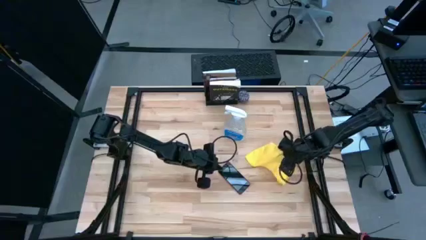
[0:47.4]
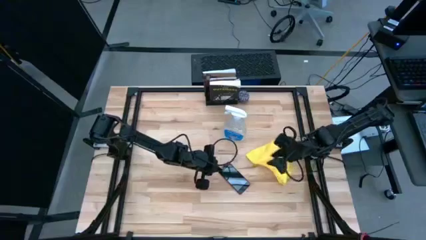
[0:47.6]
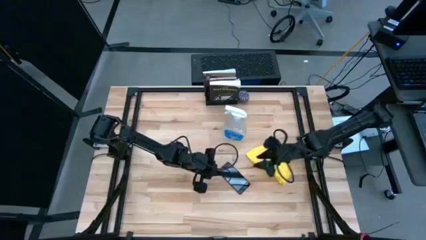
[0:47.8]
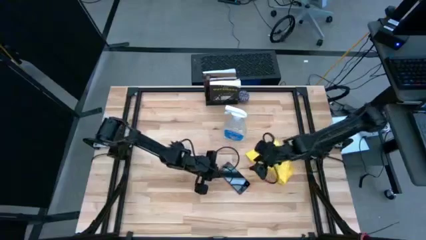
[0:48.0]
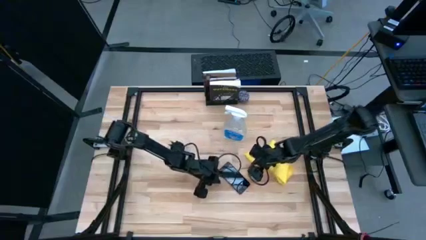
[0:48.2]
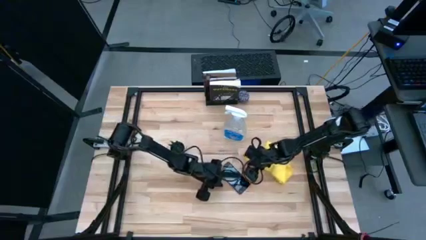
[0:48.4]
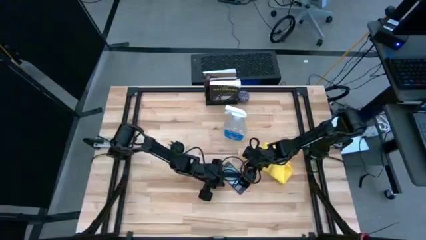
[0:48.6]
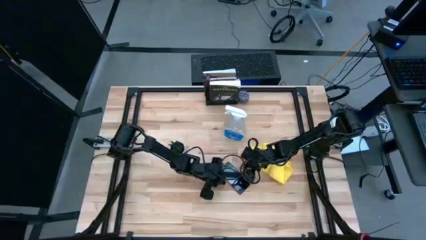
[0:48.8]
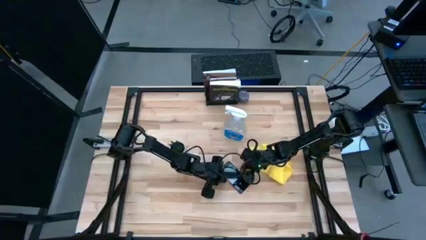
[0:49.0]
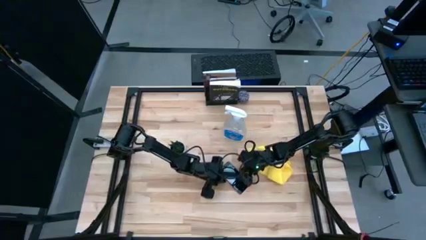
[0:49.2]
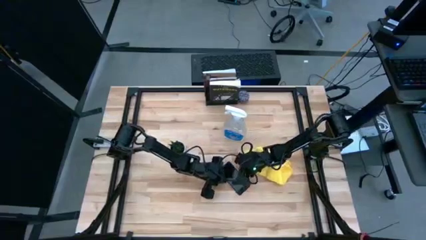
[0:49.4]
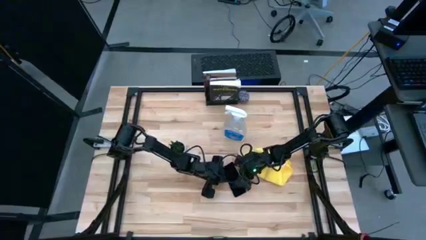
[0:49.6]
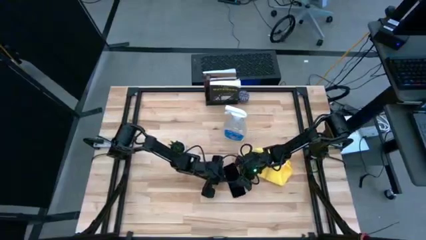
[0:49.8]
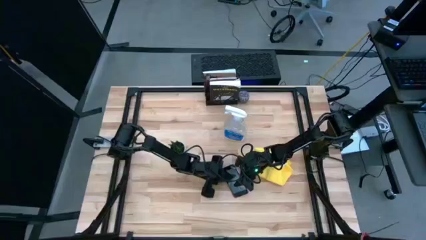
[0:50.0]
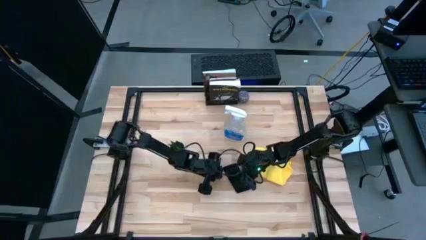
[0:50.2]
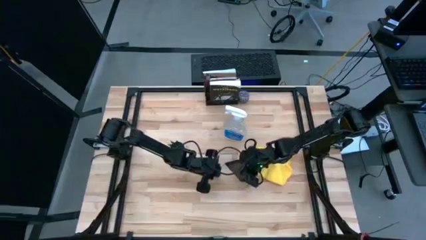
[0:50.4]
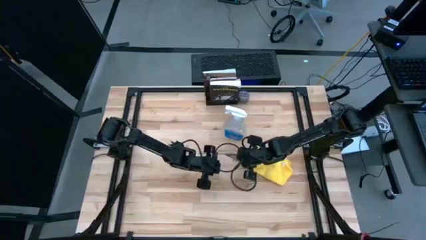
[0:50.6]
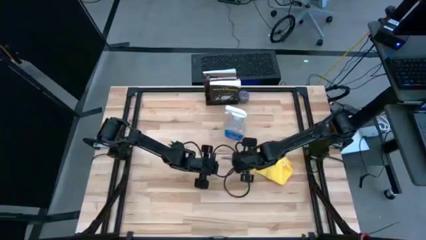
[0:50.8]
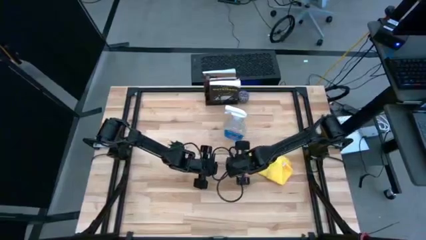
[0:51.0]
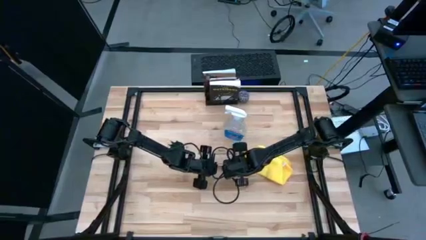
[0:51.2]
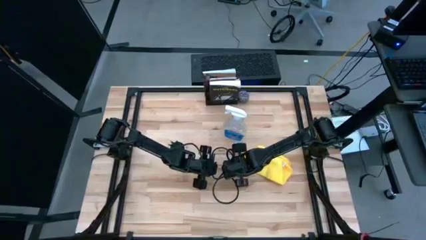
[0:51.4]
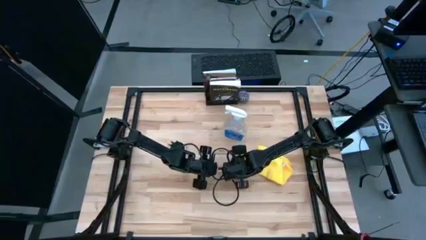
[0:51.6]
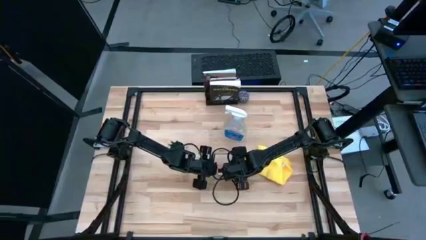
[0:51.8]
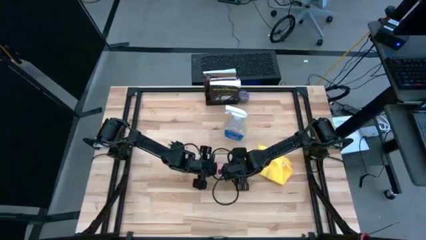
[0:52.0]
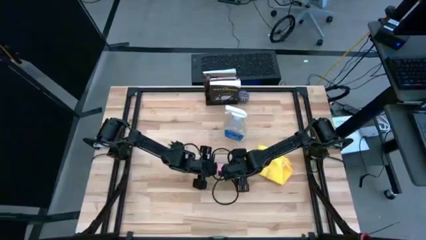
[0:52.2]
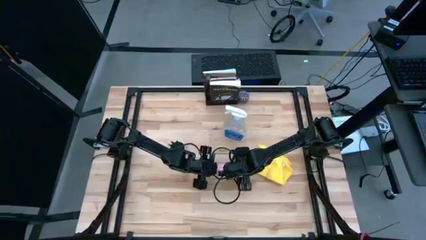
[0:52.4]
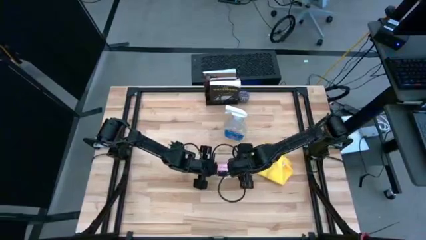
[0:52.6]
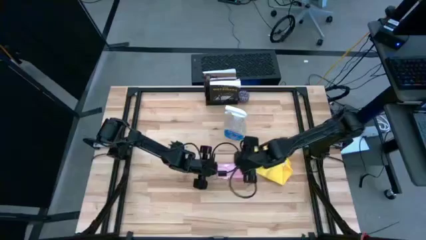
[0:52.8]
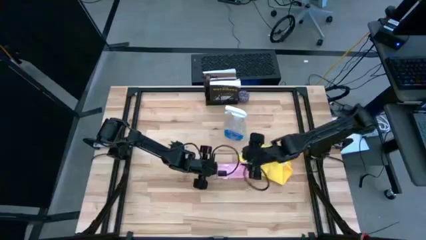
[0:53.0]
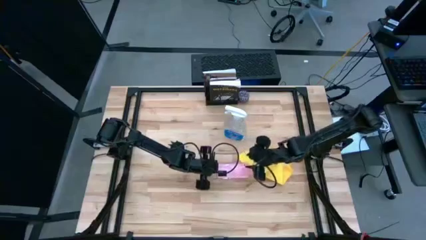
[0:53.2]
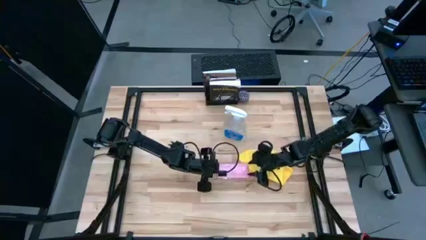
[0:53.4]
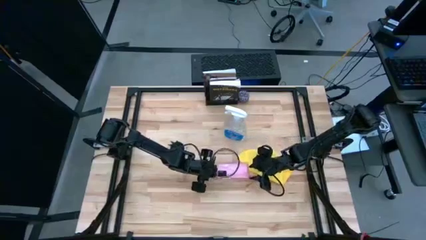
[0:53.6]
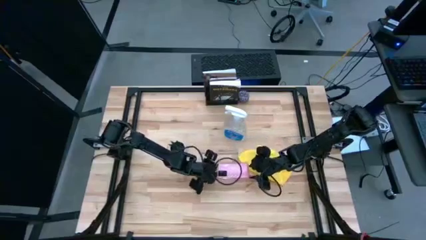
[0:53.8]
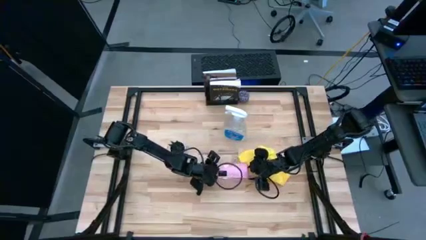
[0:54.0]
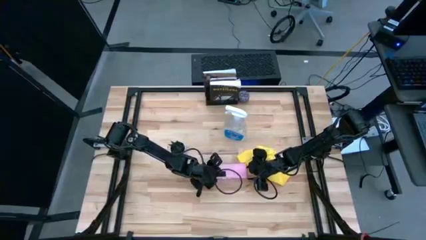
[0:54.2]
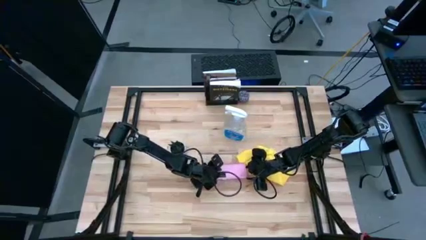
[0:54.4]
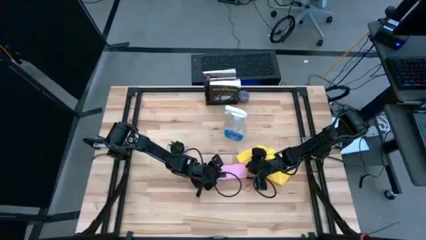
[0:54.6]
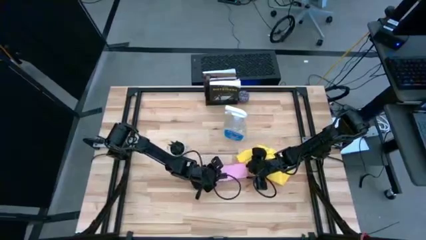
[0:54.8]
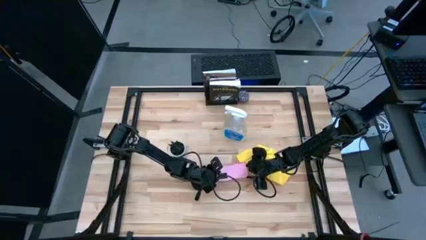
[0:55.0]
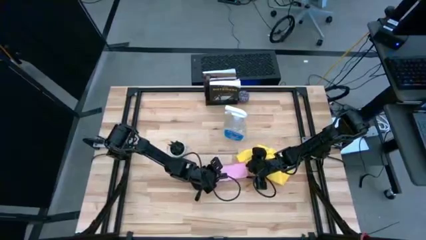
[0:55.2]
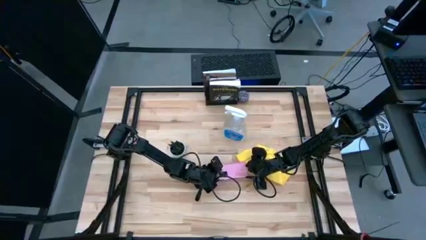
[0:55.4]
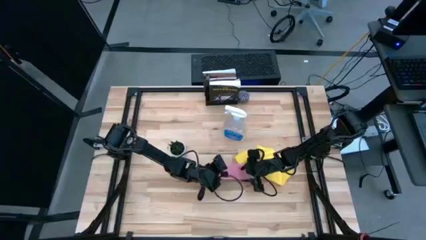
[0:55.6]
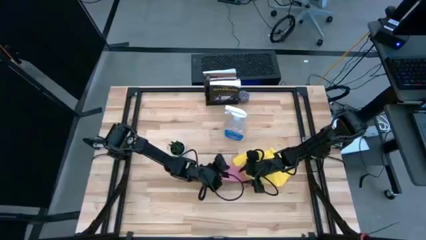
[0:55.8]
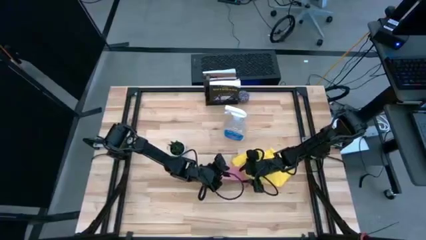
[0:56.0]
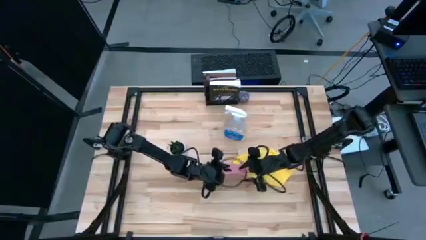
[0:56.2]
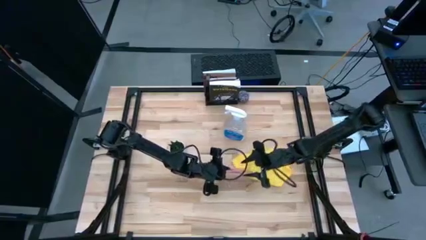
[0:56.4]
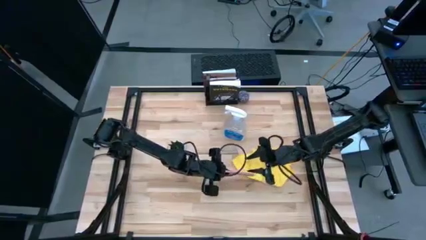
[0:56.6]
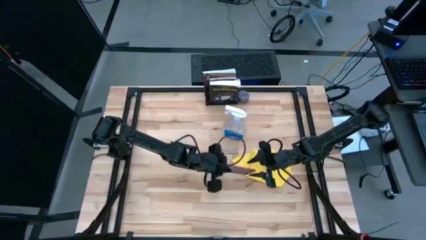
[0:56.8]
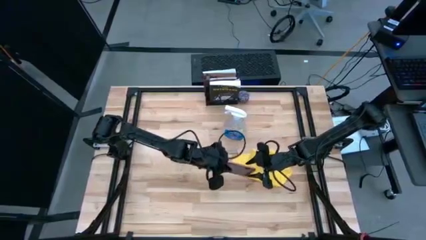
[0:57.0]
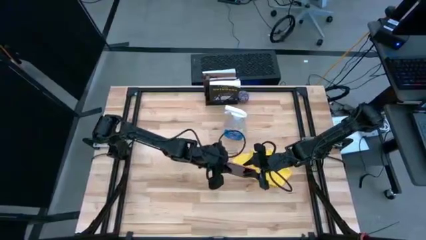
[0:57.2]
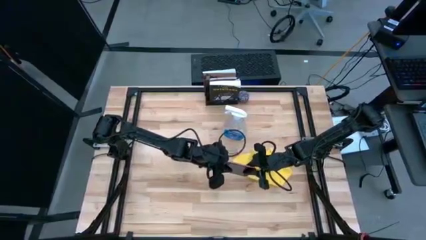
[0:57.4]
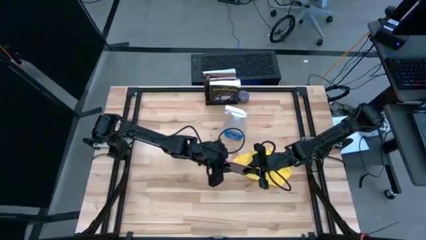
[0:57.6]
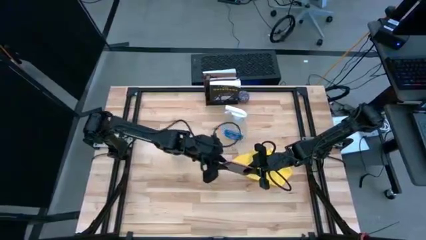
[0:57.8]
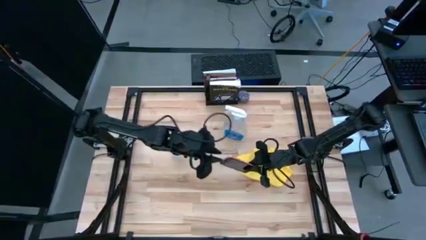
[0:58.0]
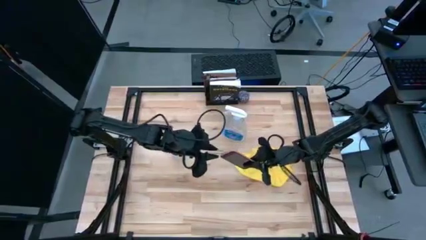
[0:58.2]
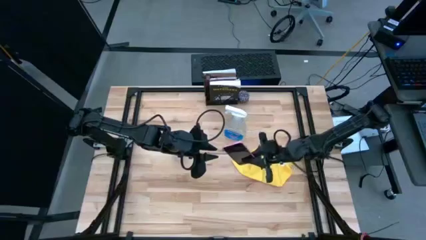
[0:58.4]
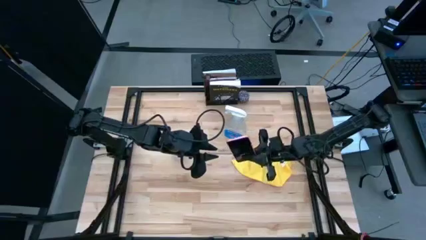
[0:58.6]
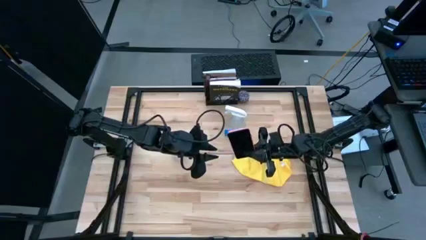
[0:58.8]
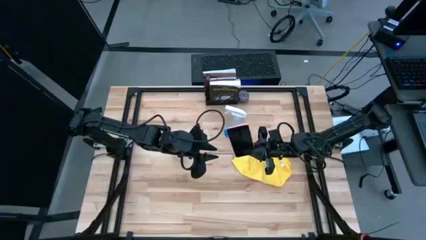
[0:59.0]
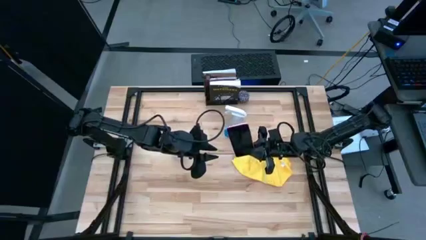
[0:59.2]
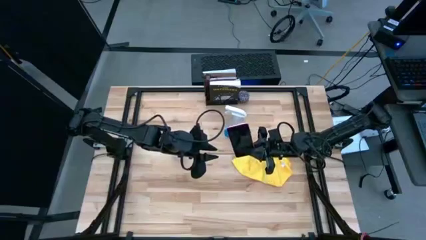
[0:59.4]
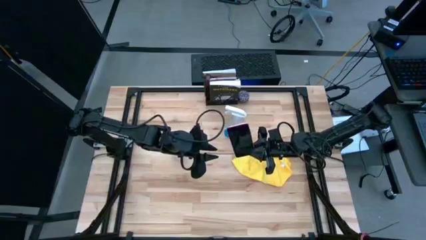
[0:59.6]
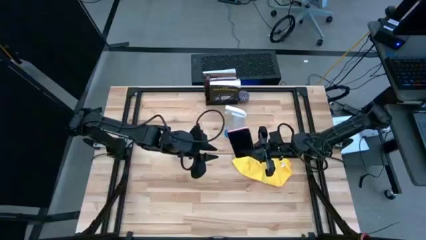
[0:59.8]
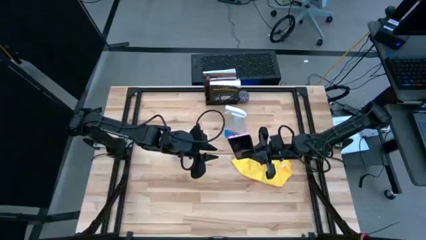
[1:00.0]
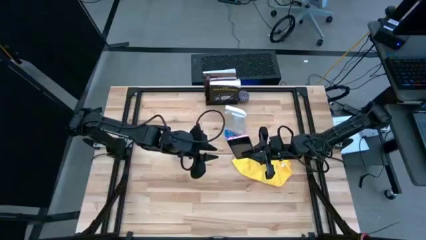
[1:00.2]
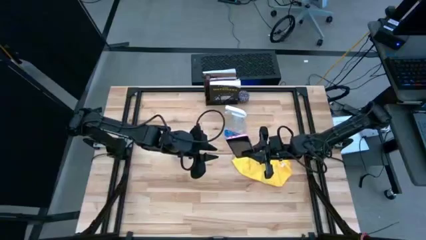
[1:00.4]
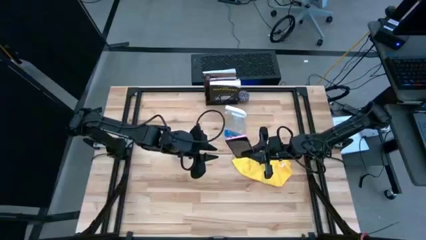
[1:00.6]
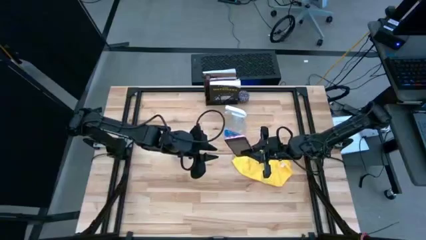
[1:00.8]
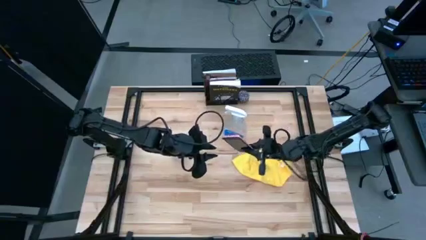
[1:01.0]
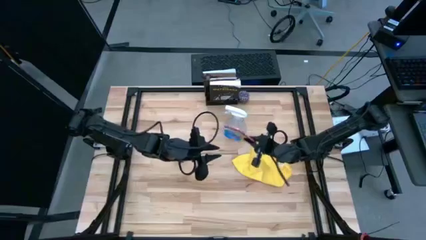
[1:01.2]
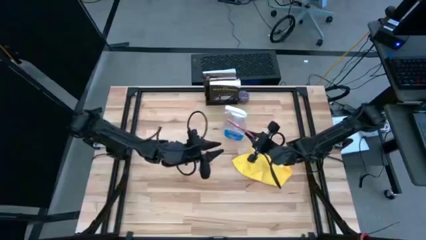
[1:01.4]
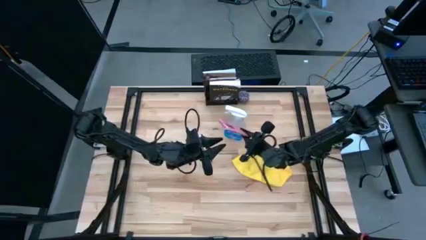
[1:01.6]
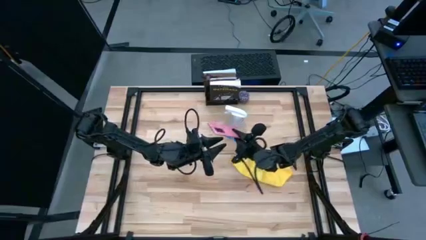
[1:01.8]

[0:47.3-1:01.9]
Task: Apply microfiber cloth
Spray the back of the cellphone using the spray bottle

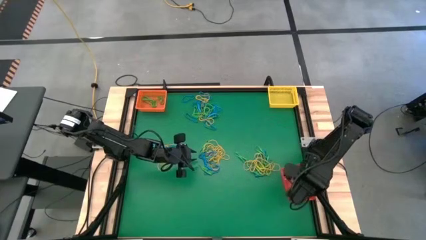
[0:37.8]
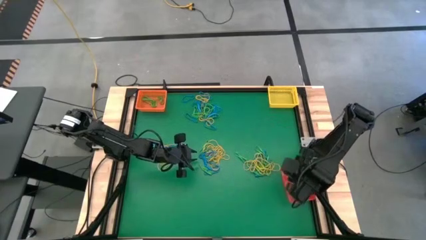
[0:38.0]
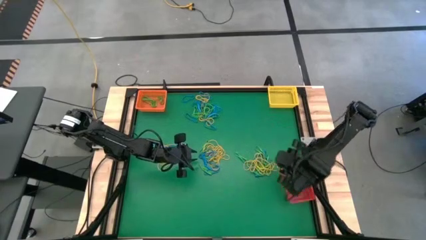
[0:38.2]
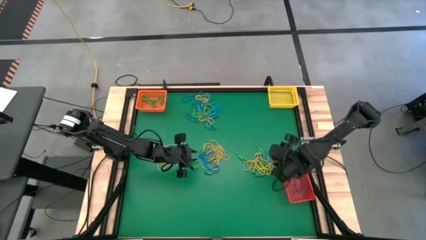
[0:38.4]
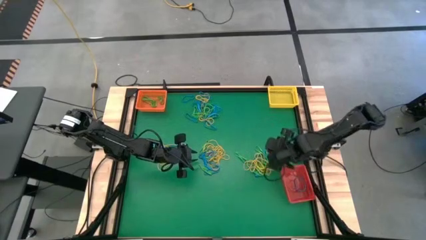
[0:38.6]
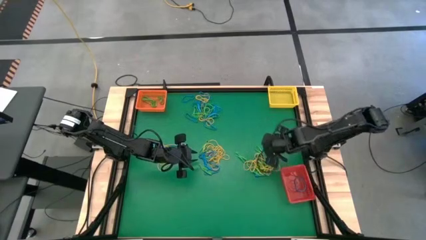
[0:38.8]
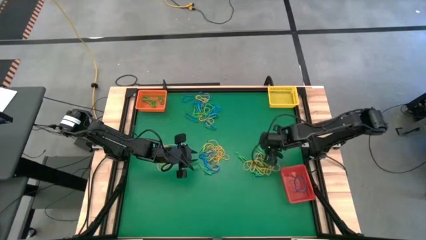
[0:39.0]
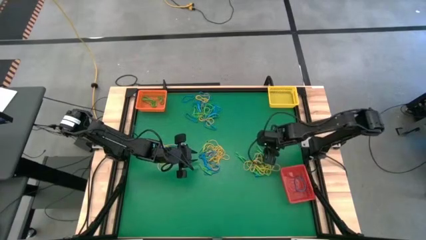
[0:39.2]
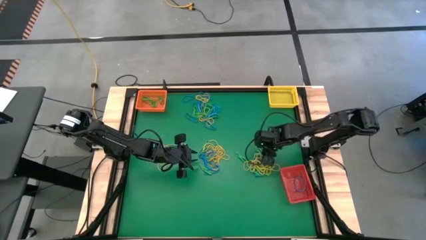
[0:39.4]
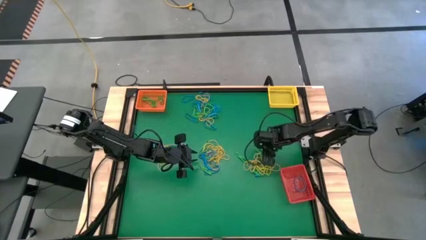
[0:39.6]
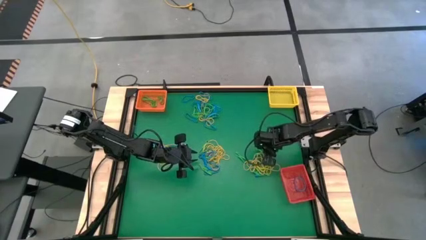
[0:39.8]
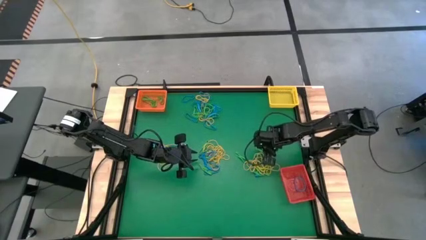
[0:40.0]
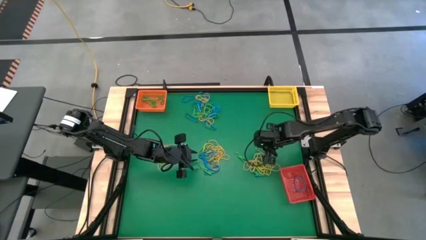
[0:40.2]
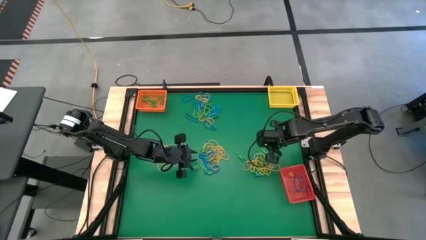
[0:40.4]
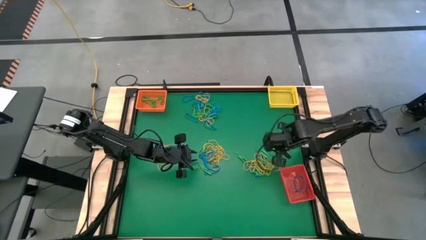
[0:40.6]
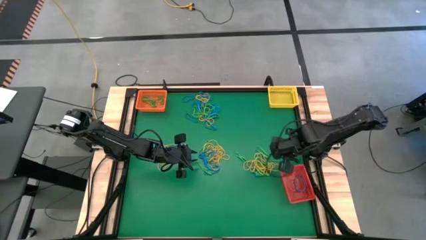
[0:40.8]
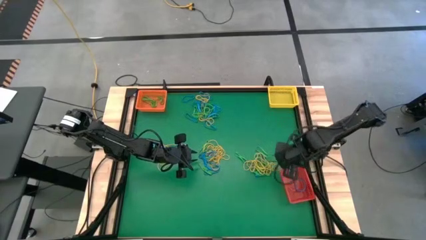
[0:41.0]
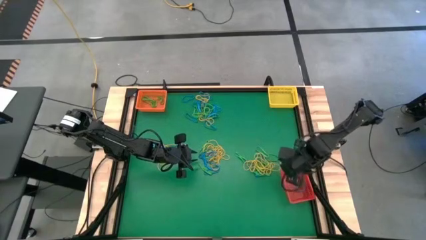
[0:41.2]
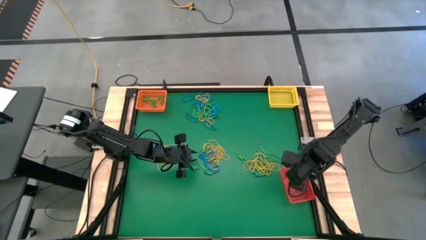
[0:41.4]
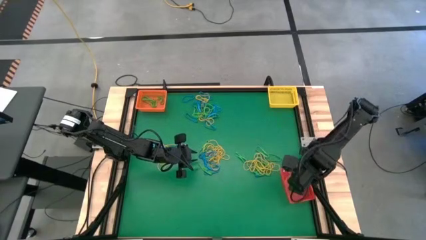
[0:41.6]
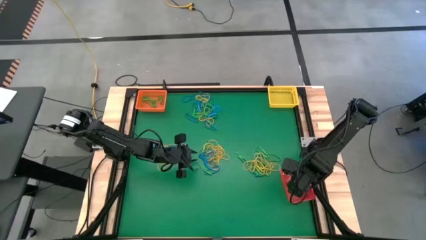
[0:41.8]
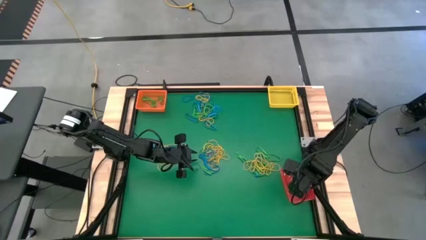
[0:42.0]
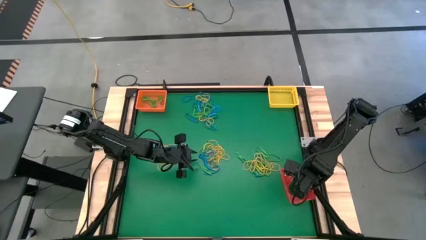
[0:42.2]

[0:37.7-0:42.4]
Task: Sort rubber bands into baskets
Put the blue rubber band into the red bin
